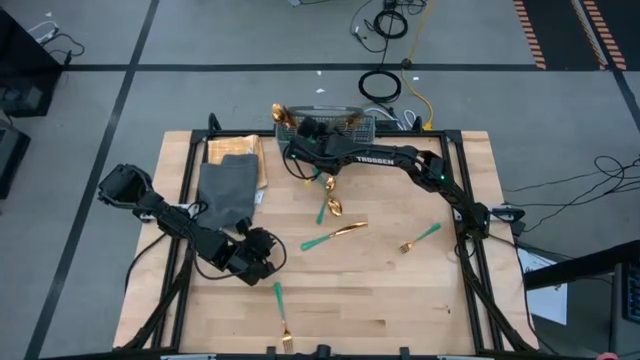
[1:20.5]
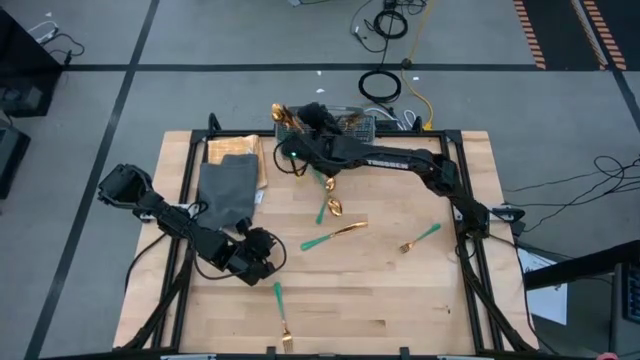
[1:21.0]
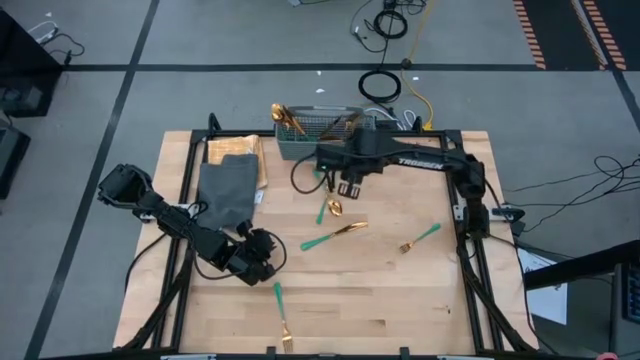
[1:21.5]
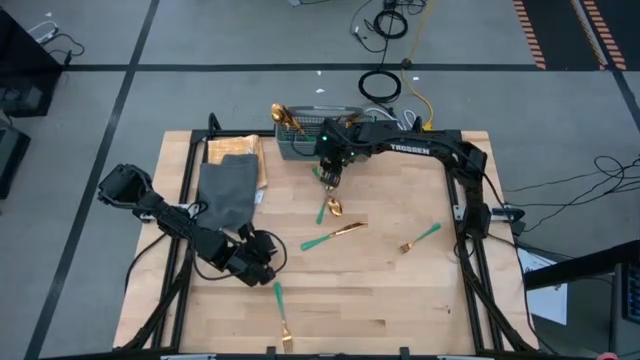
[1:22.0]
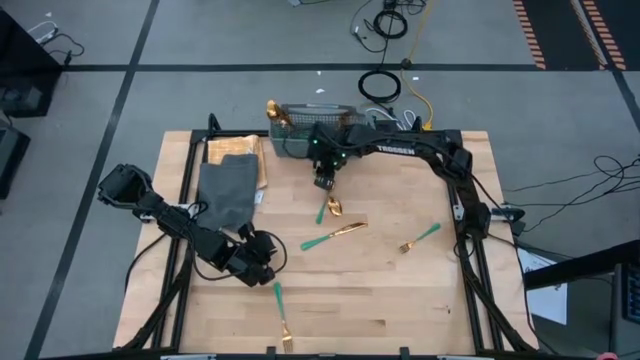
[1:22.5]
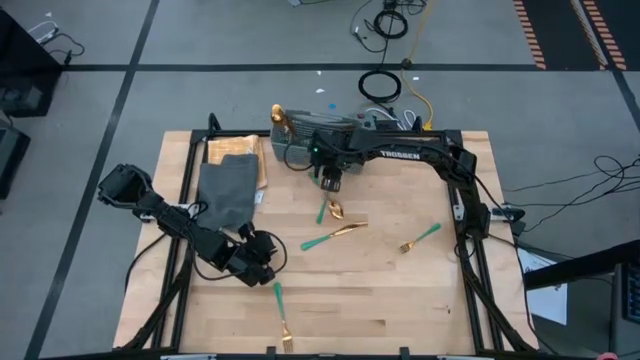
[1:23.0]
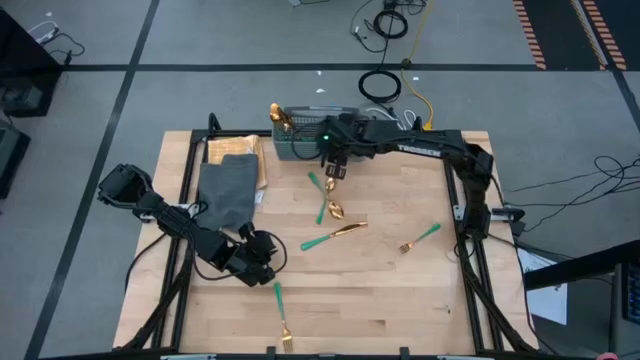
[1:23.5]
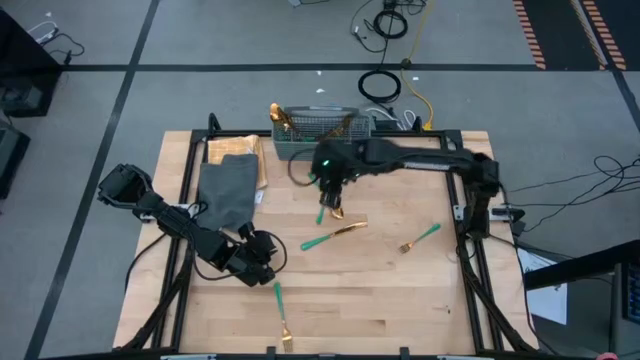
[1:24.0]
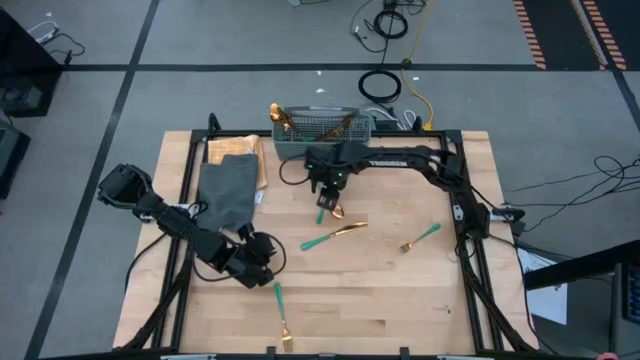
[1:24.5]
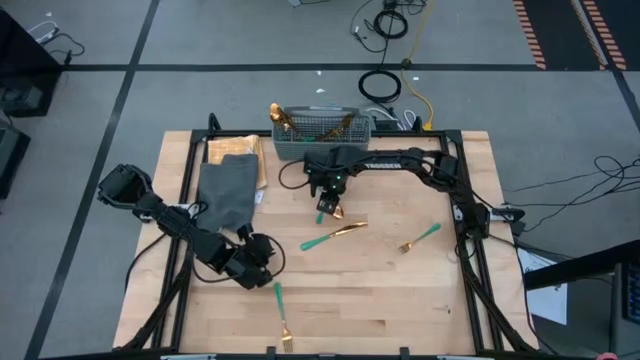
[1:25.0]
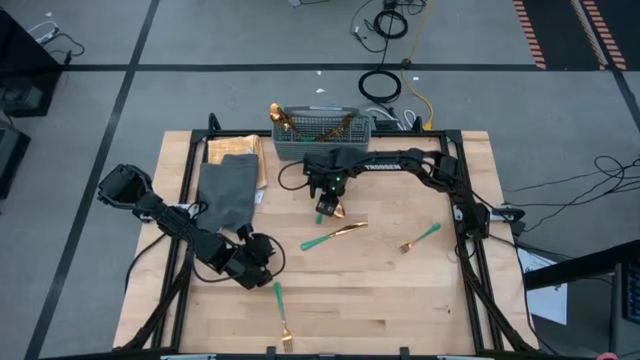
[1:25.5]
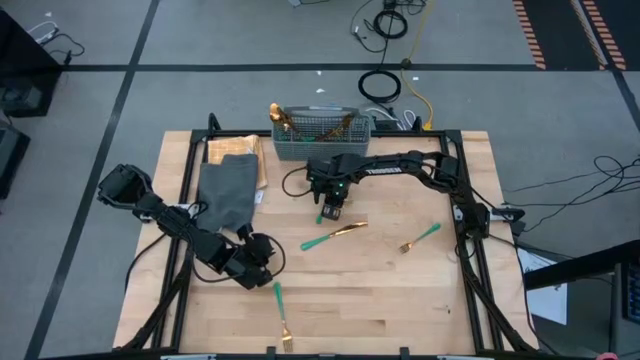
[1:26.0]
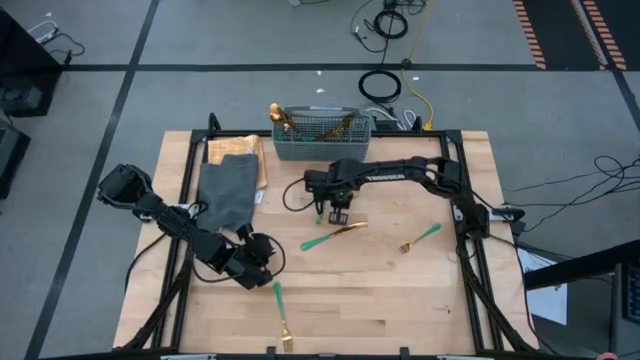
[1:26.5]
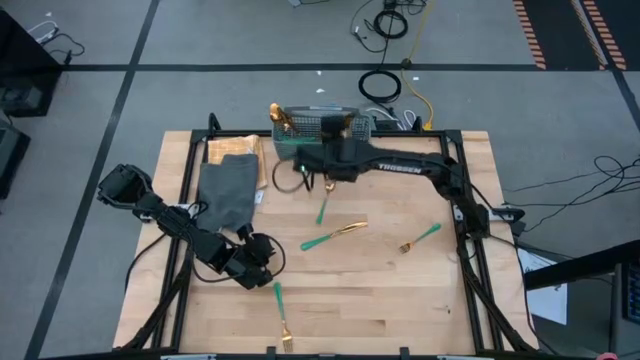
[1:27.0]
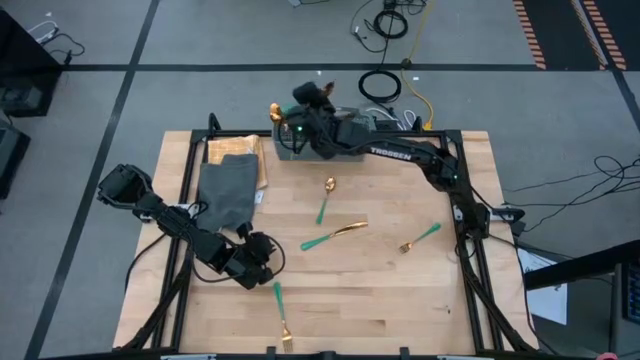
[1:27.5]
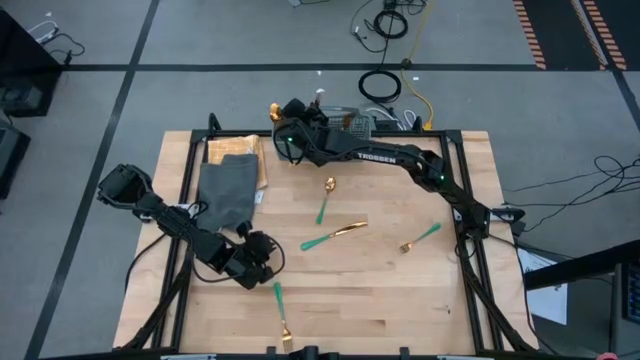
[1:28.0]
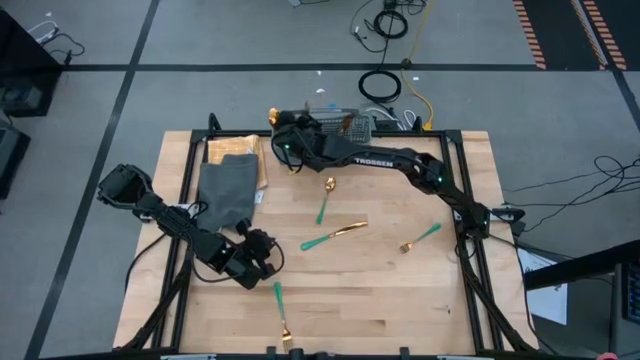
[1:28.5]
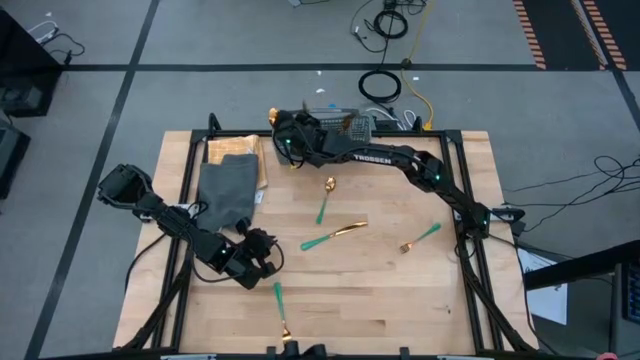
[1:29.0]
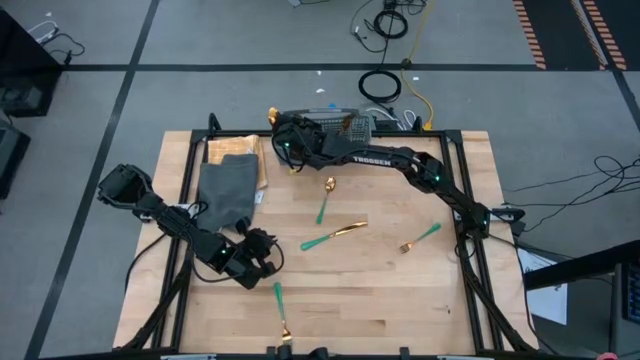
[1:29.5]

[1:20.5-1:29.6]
Task: Sort silverware
Put the green spoon into the silverware basket

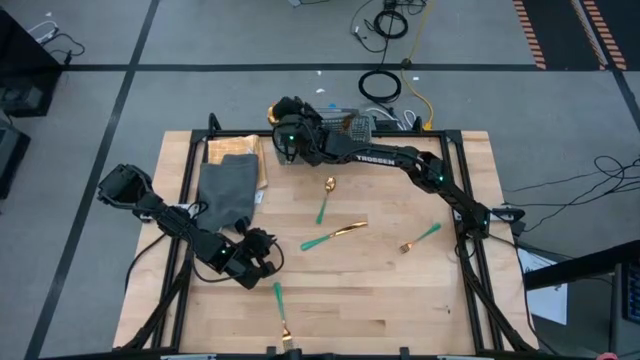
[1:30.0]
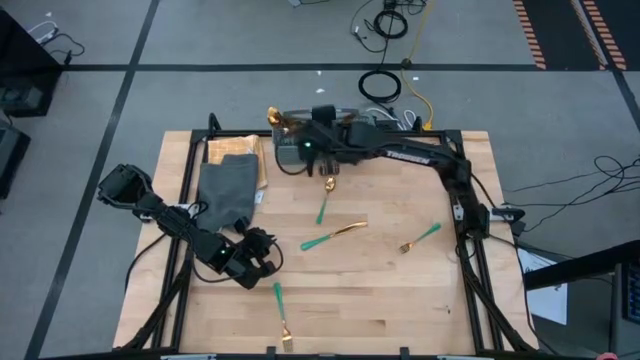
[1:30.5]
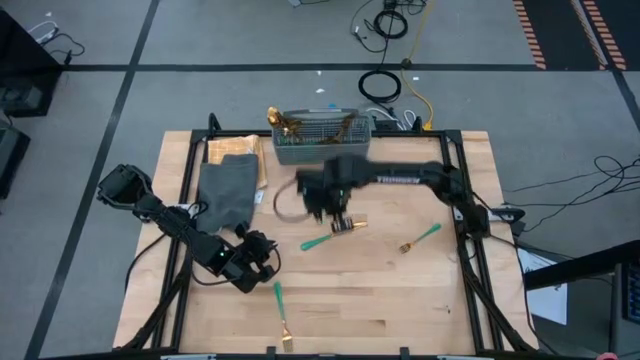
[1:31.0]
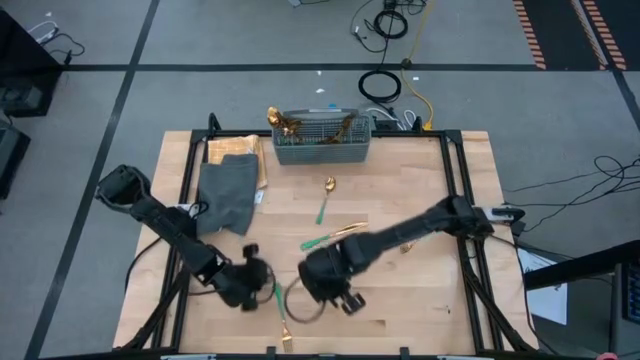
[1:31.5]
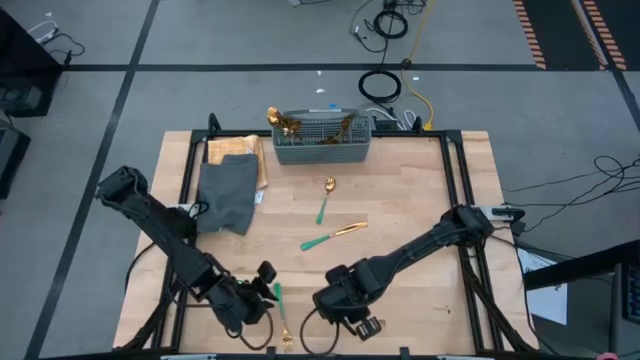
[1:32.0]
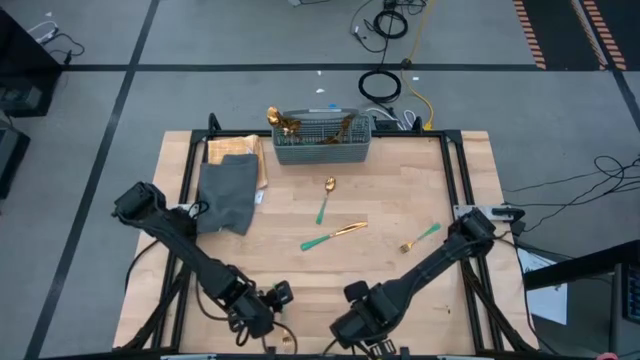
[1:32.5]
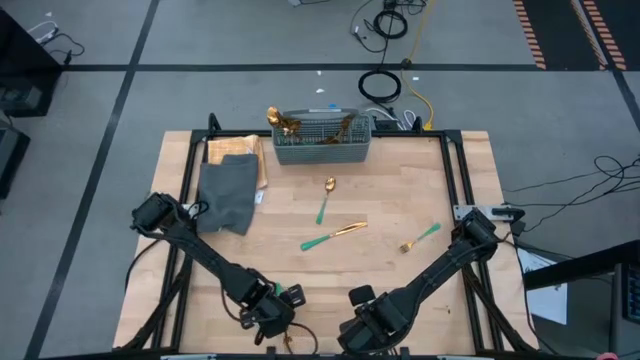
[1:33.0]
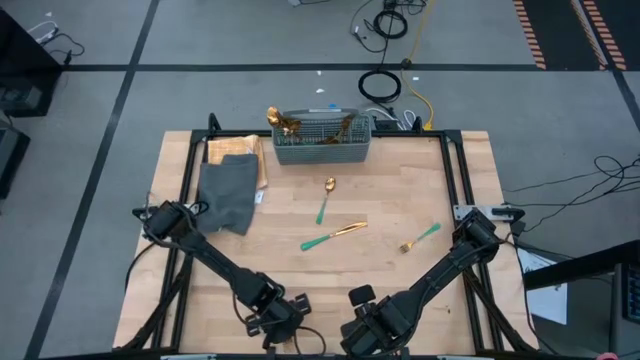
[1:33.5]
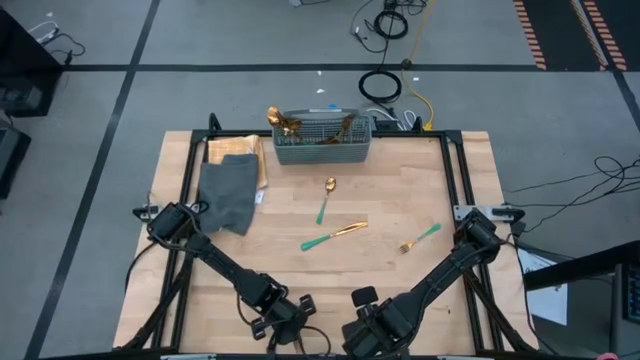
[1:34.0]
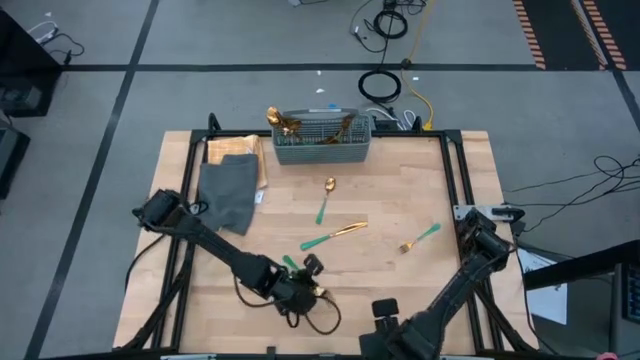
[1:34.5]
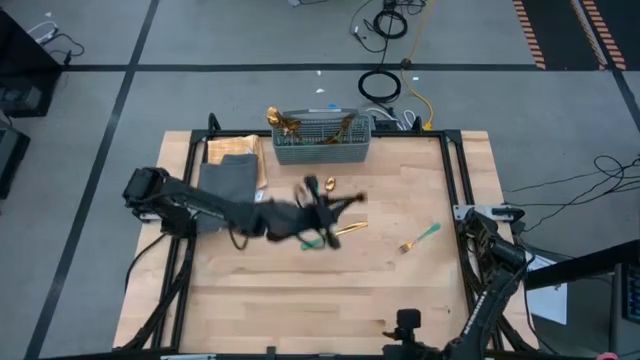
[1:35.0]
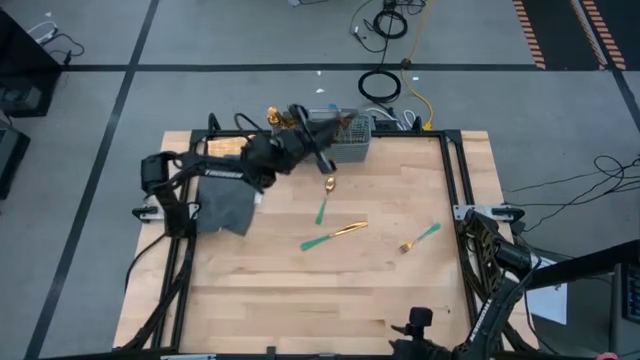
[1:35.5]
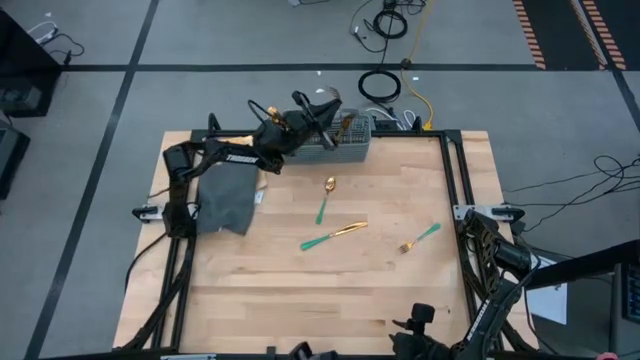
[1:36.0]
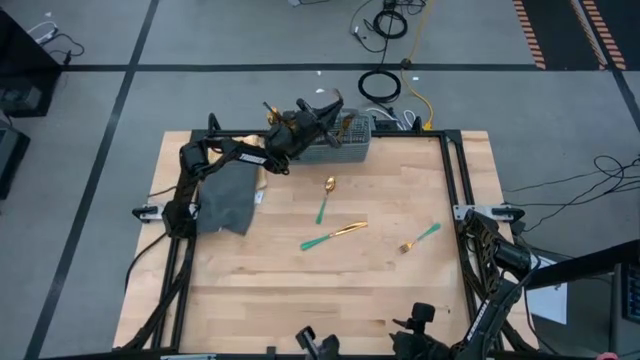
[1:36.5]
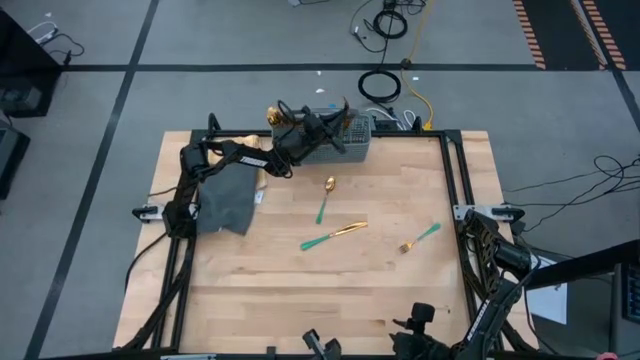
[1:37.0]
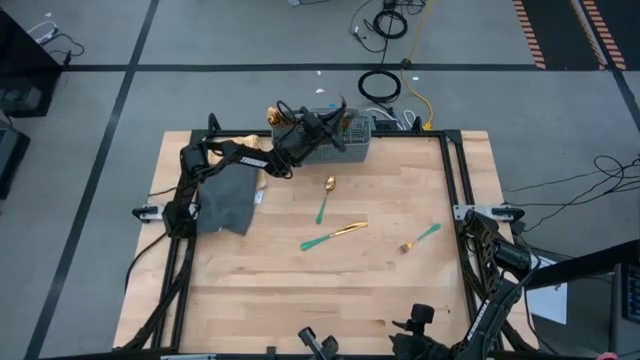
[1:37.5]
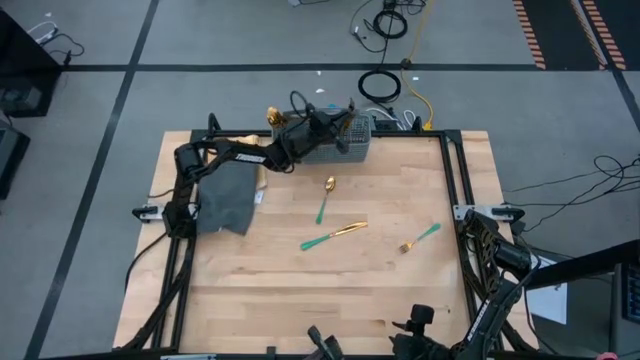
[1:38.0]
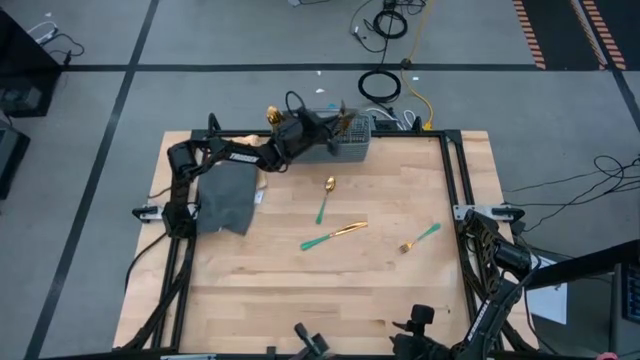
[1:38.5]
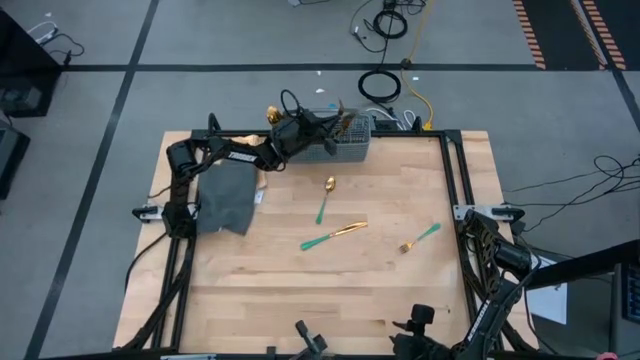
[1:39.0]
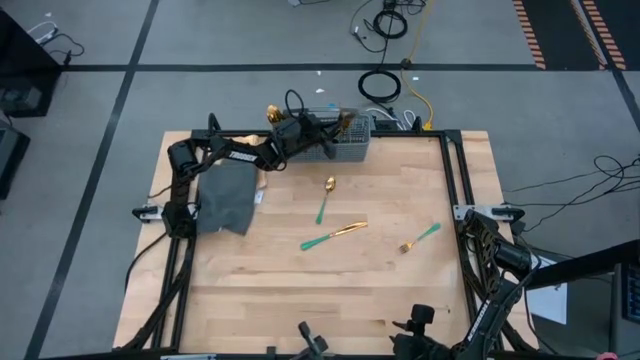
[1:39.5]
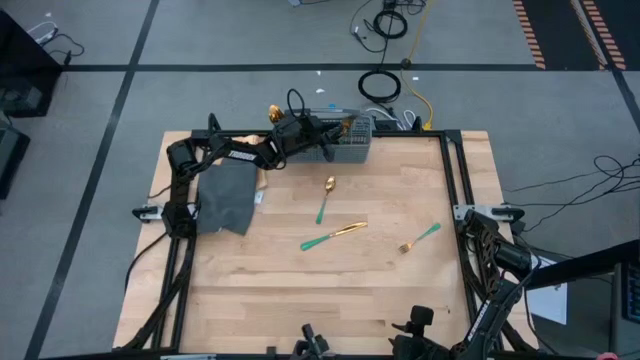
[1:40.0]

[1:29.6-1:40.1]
Put the green fork into the silverware basket

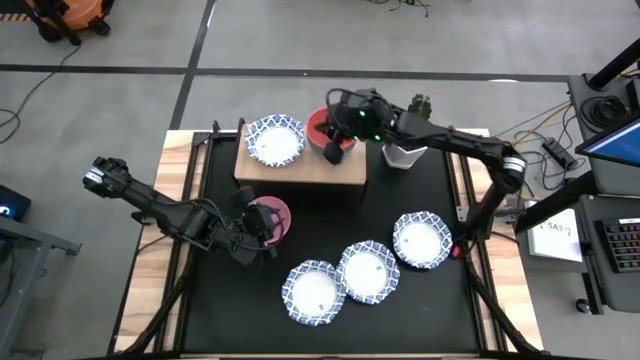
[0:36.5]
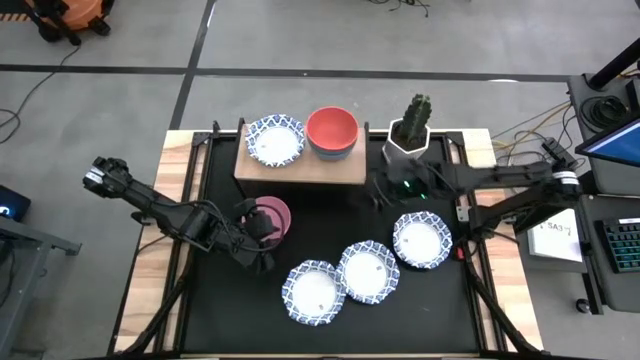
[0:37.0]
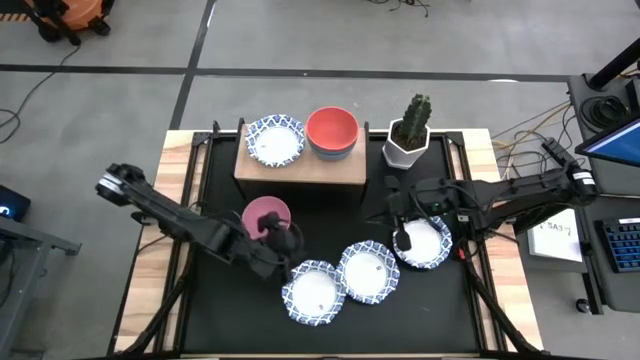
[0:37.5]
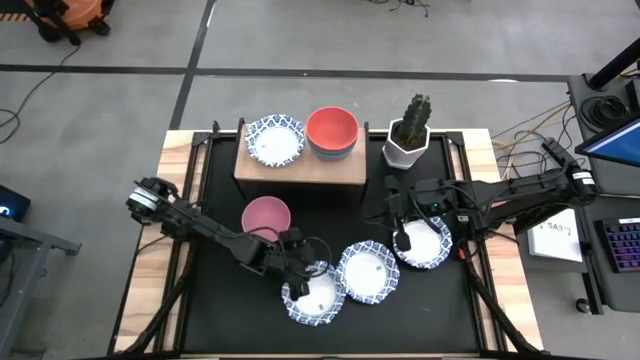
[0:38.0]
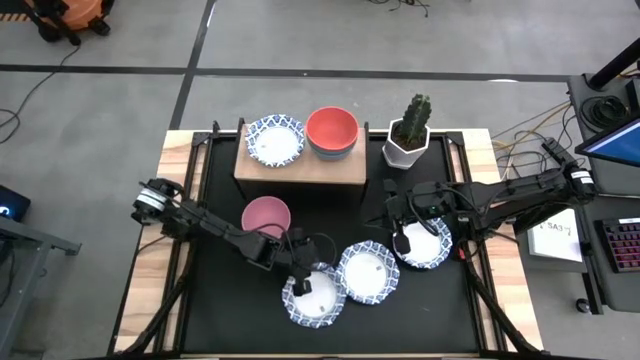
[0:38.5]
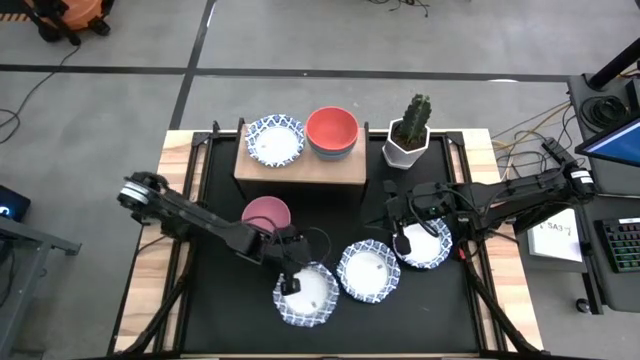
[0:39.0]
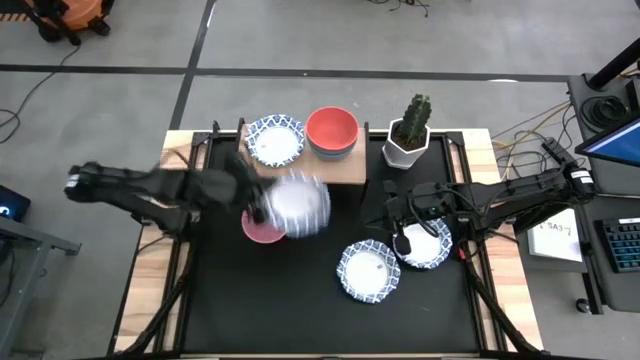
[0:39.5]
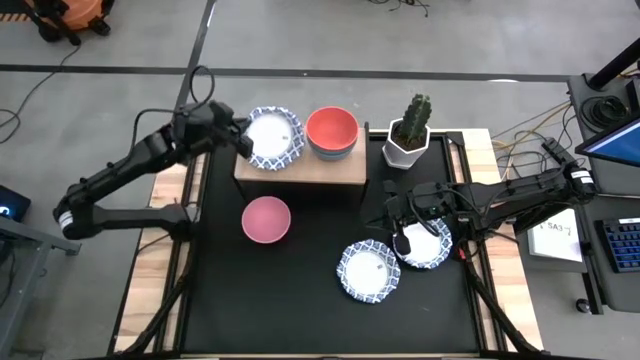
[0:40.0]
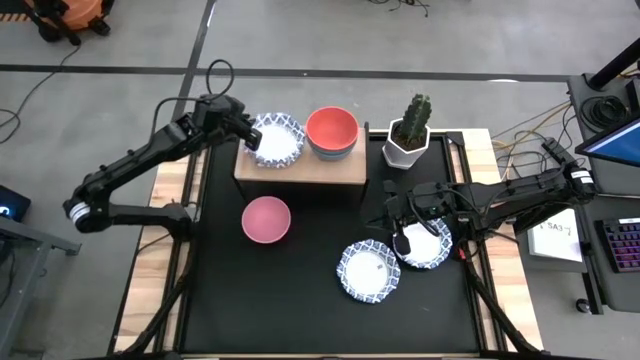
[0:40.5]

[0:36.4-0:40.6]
Task: Place and stack bowls onto a shelf
Stack the blue patterned bowl on top of the blue patterned bowl on the shelf
